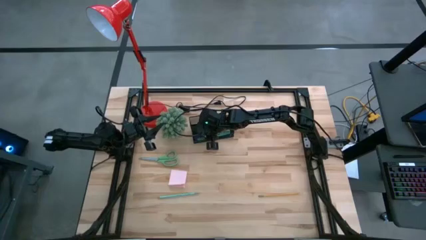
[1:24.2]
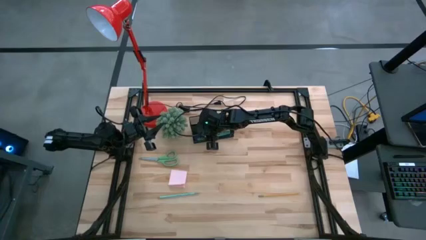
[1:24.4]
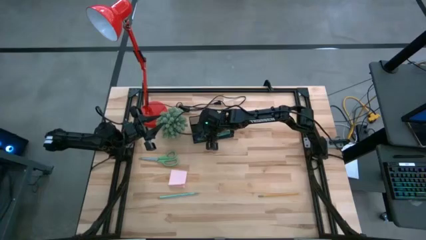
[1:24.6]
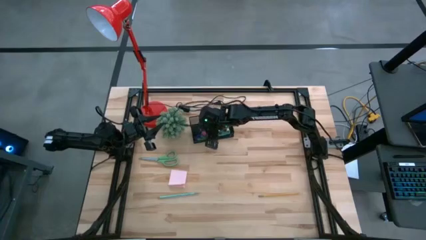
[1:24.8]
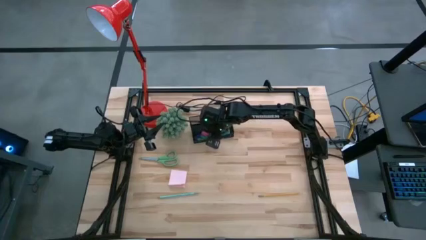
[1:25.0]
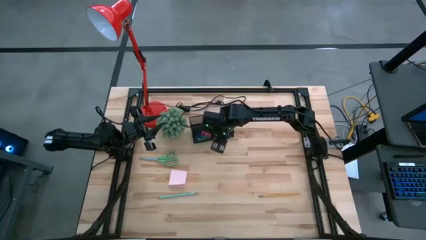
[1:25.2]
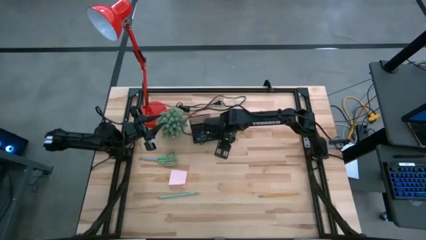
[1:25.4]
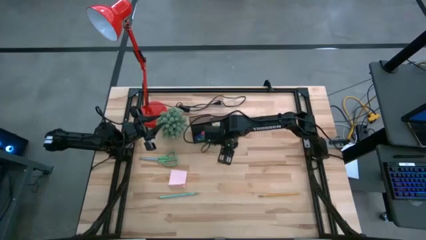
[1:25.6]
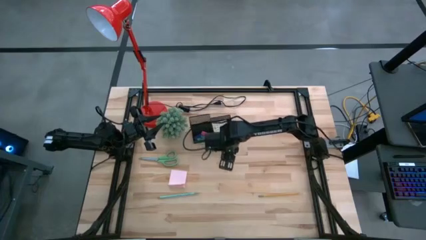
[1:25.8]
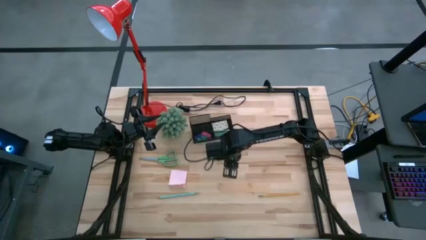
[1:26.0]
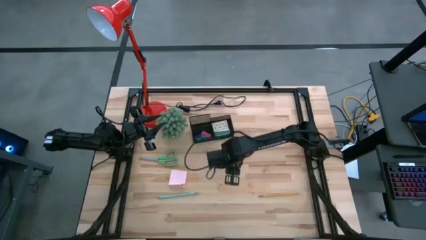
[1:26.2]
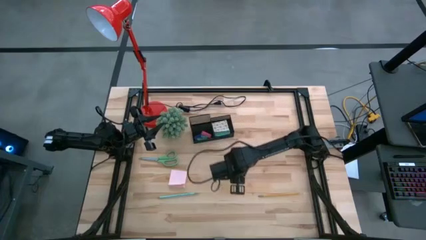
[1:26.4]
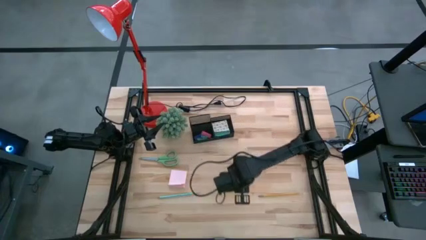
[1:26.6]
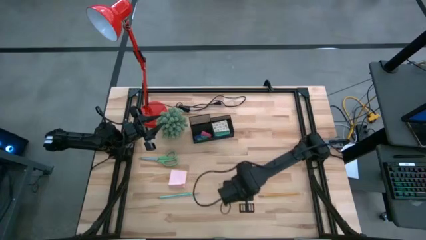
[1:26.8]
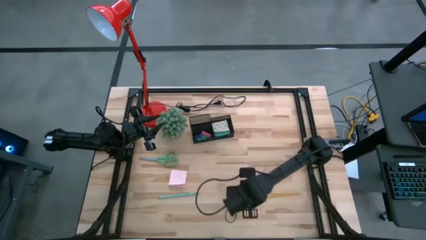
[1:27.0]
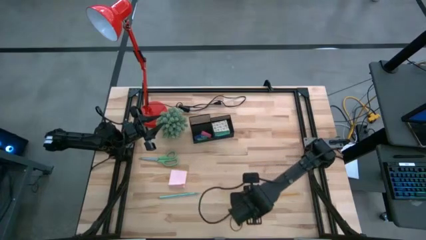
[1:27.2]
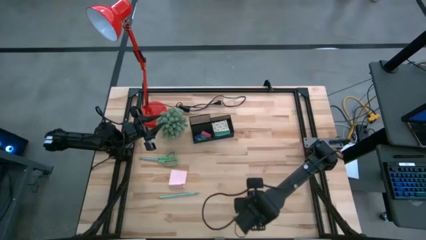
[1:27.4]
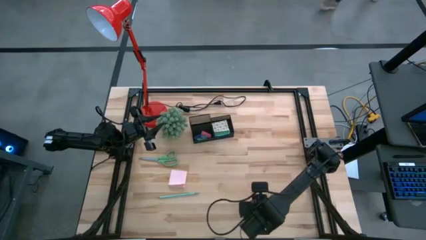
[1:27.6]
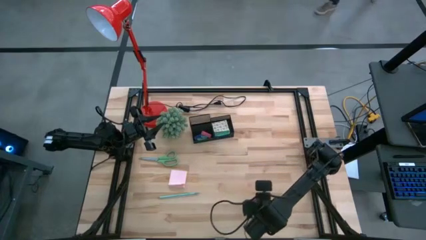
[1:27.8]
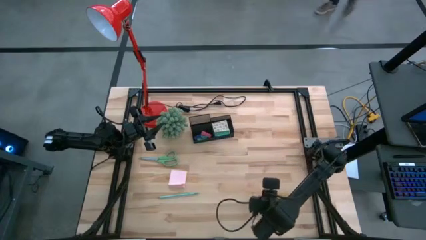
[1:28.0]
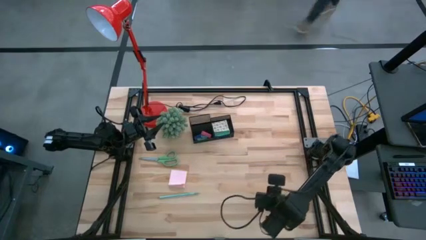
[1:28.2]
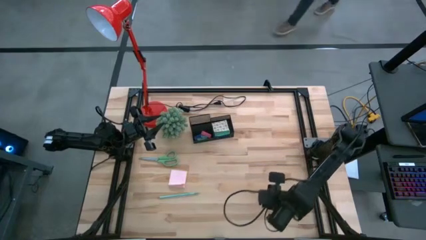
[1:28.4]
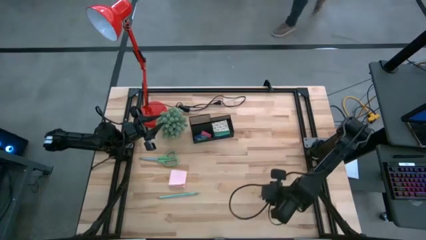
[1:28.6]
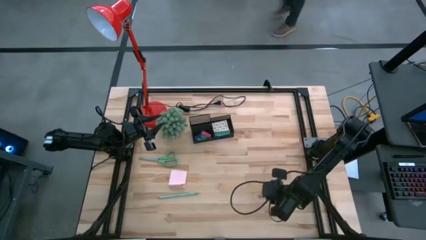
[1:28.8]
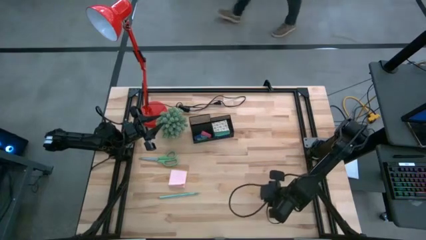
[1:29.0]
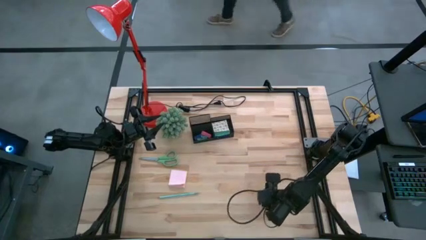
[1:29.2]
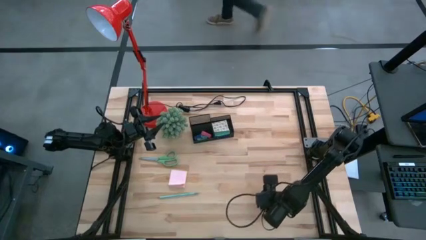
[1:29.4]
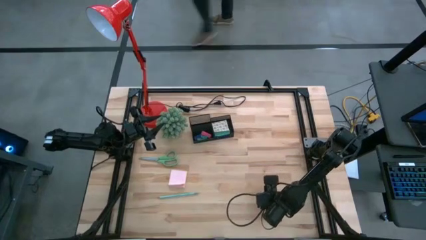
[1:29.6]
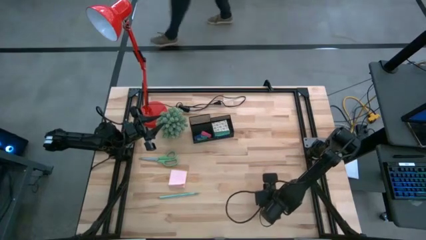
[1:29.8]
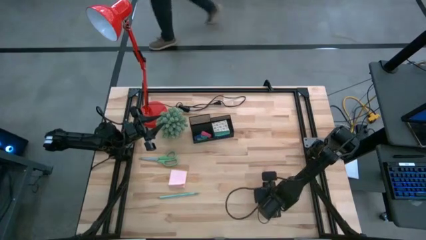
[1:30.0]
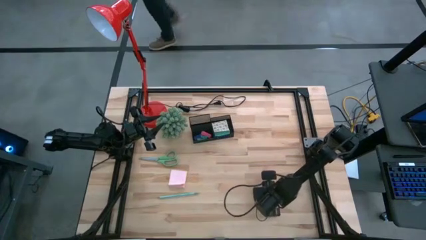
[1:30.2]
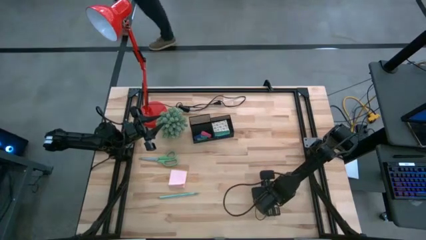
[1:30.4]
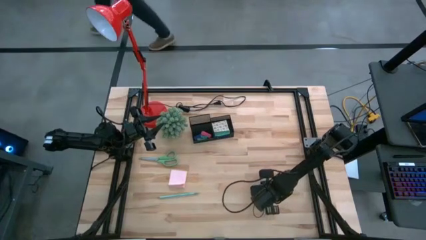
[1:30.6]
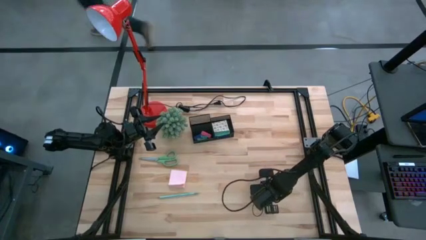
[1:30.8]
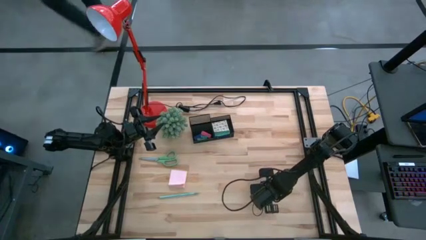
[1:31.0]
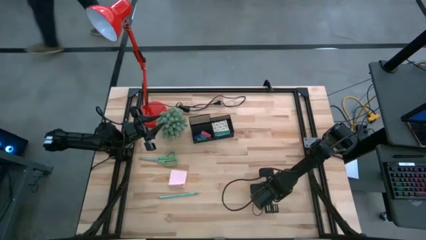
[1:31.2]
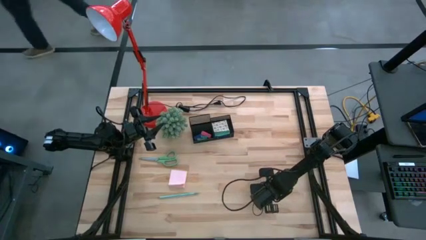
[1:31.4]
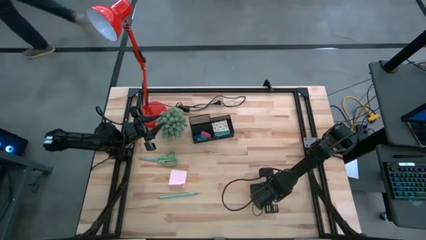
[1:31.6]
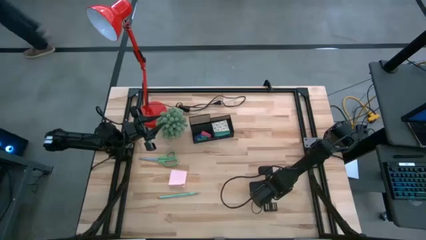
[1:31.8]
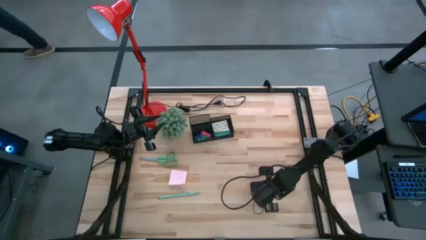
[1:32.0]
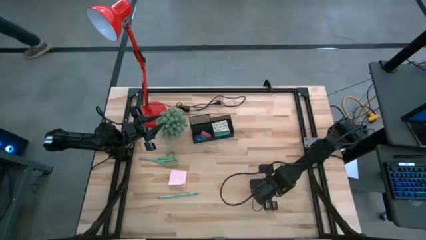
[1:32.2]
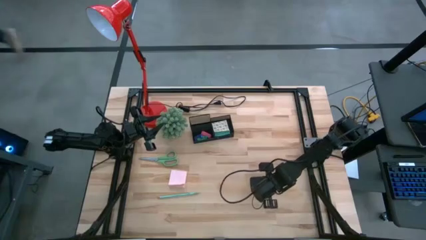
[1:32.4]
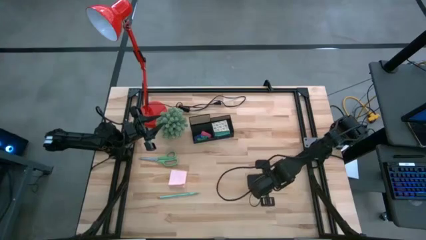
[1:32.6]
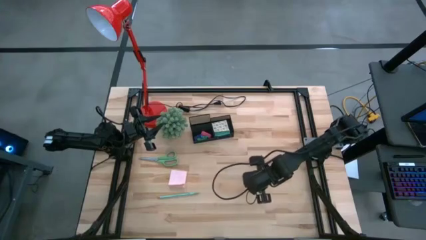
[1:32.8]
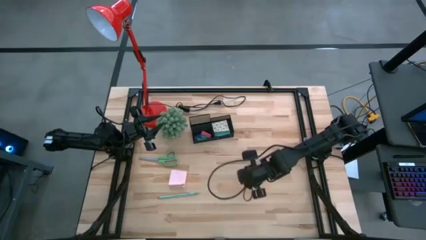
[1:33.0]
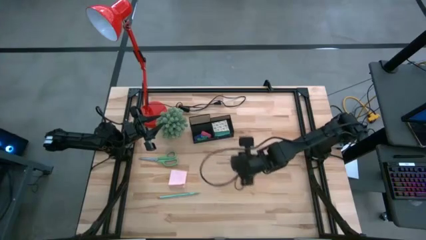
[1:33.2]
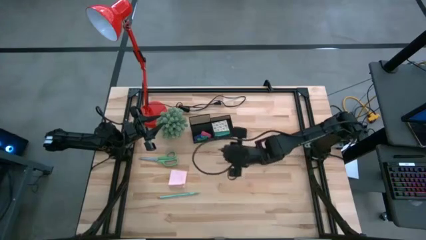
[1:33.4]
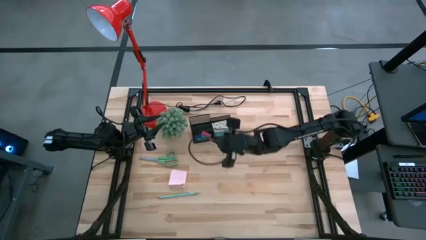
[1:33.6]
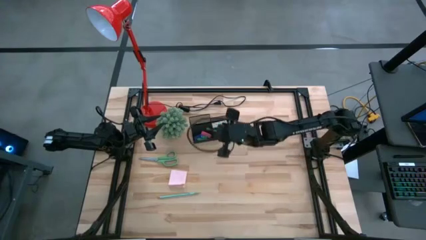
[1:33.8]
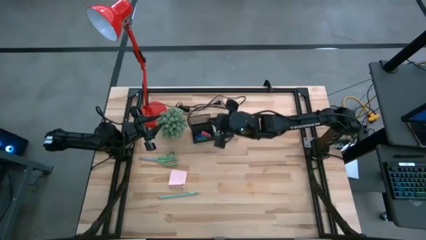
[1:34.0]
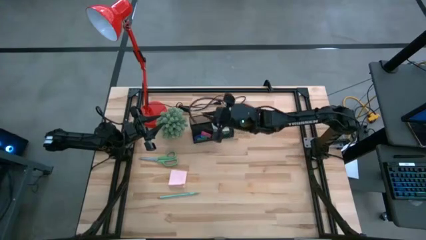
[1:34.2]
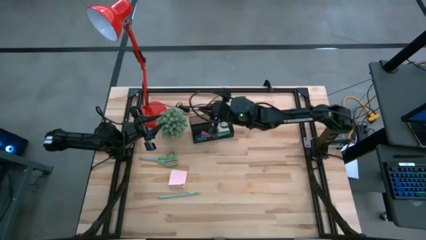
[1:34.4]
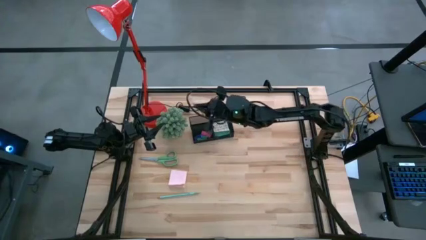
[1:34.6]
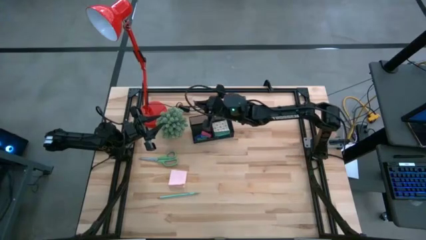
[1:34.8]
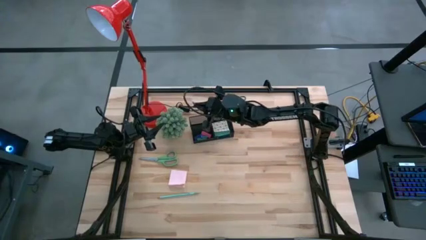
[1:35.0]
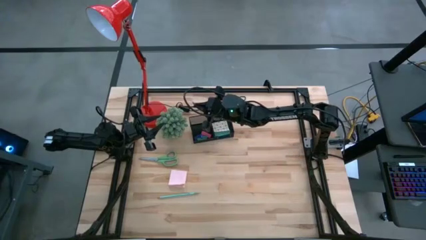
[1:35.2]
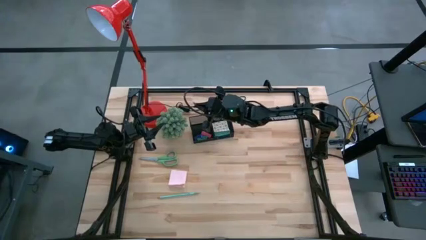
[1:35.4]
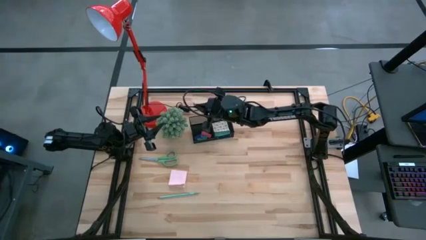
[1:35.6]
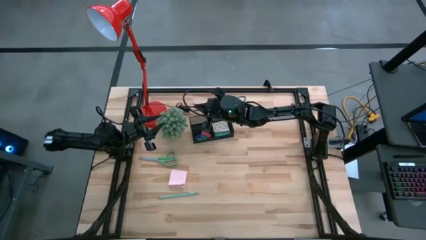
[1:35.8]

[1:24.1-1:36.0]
Task: Pick and place office supplies into organizer
Put the yellow pencil into the desk organizer

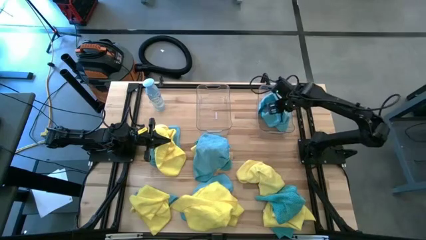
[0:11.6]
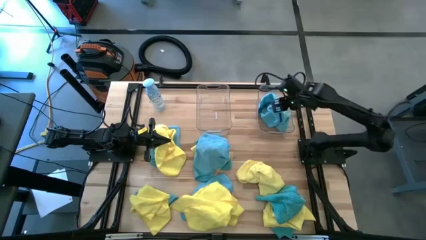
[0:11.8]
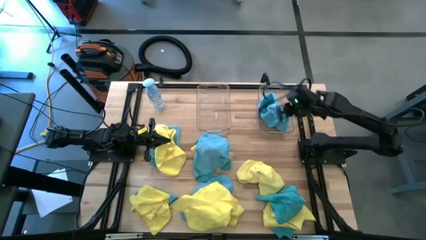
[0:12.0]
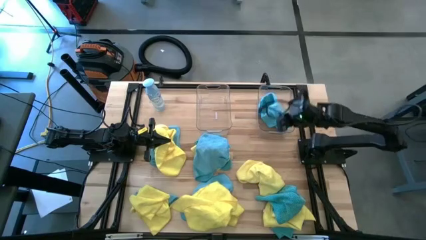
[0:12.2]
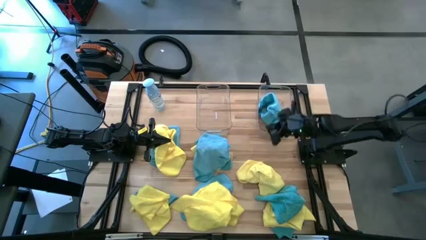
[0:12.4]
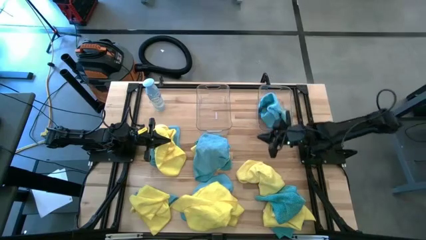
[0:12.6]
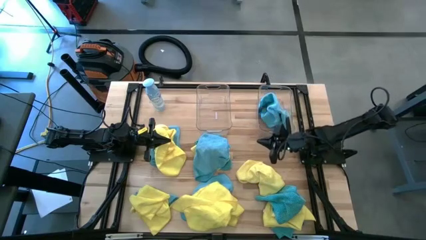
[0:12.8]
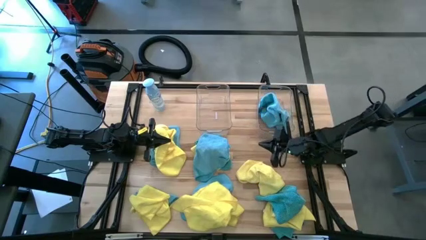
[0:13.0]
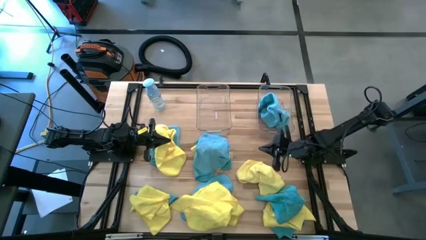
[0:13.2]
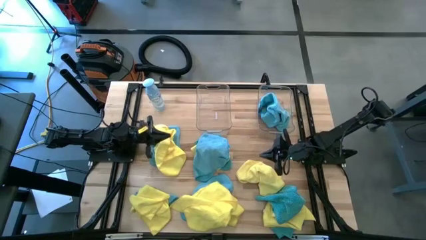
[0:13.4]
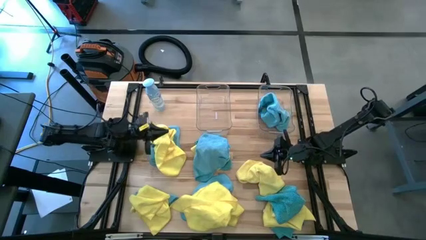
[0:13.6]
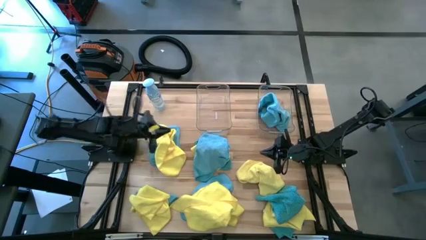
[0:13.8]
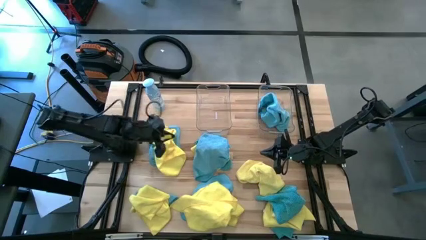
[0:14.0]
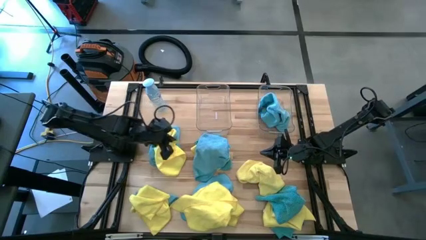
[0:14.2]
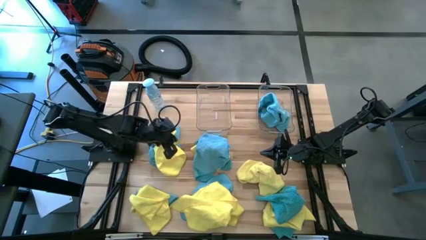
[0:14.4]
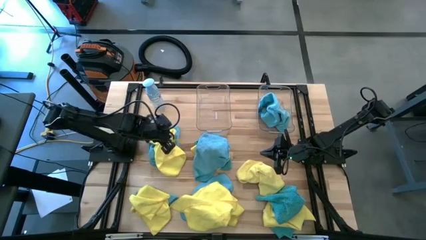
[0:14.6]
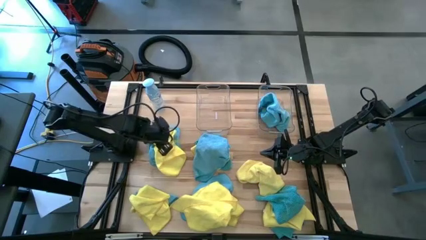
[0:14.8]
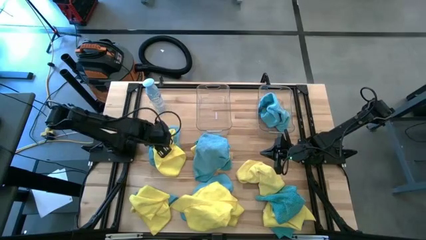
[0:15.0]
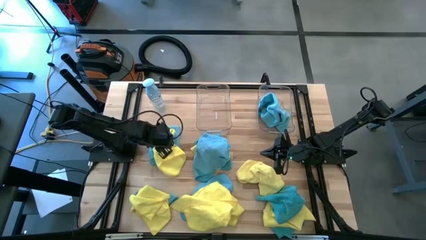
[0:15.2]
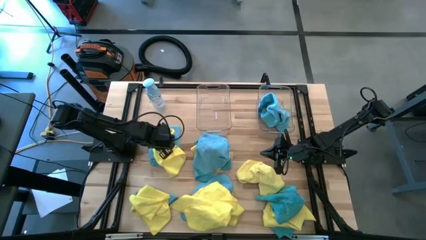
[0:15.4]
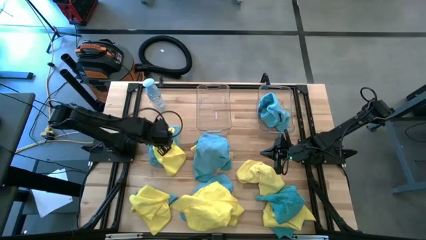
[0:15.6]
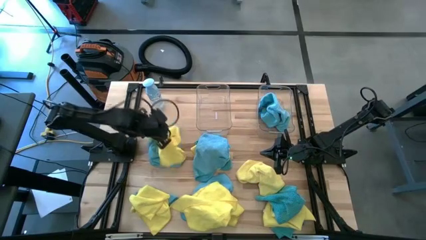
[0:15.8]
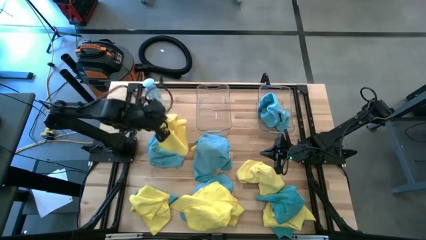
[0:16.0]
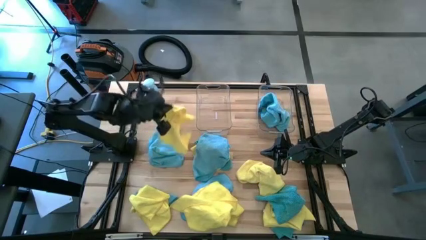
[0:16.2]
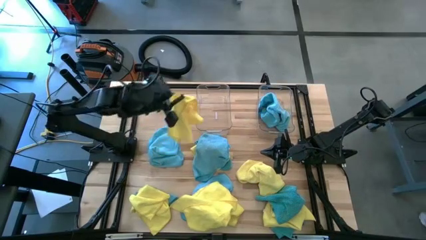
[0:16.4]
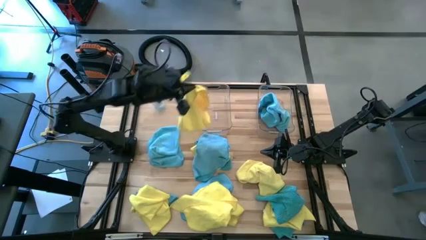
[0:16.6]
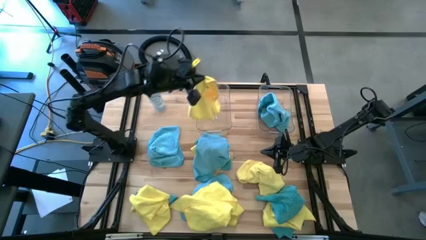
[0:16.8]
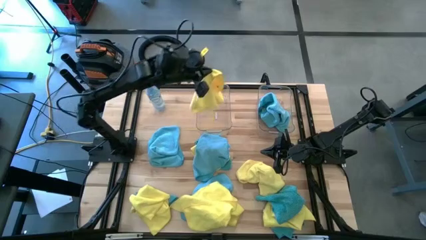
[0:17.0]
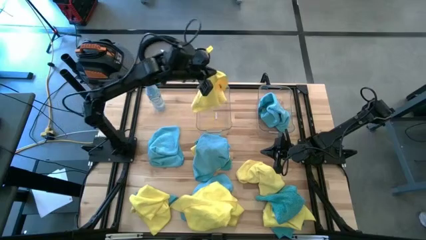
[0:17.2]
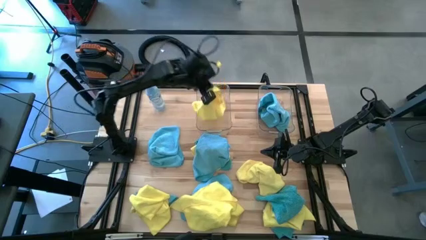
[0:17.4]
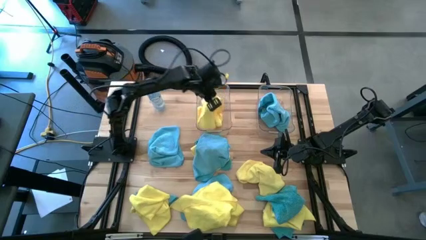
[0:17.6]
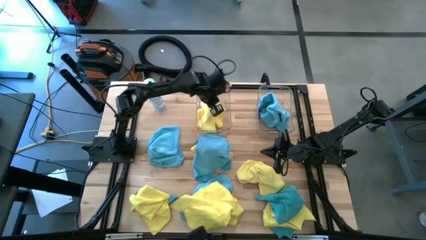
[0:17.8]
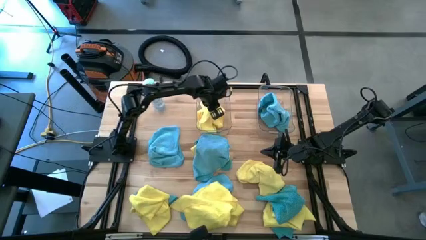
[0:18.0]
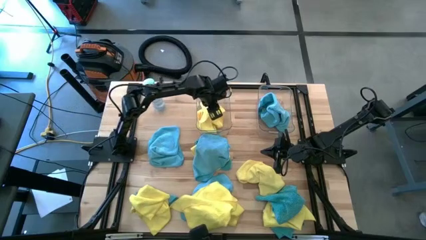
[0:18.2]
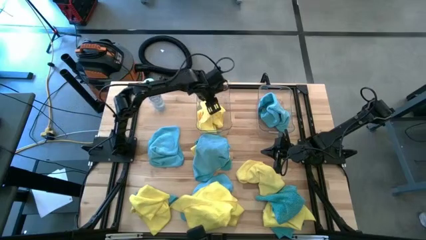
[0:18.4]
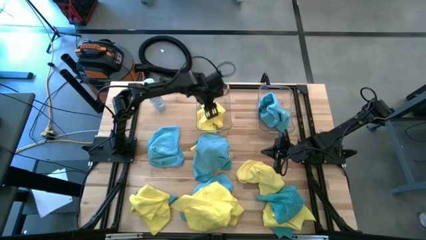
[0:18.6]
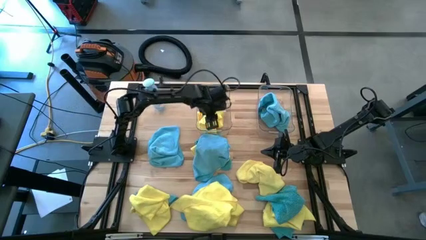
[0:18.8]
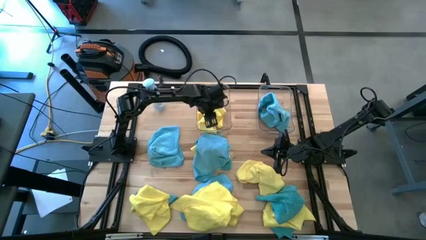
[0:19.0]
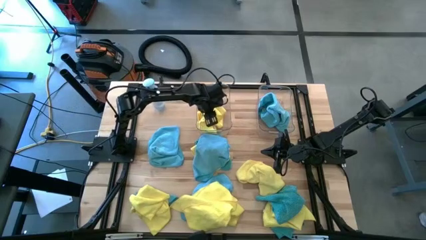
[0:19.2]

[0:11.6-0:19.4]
Task: Sort microfiber towel by color & place in baskets
Put the yellow towel into the left transparent bin
